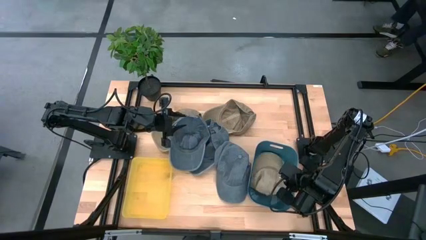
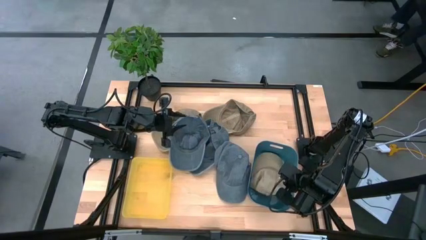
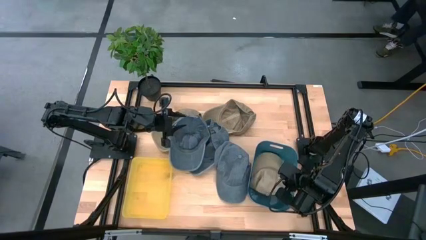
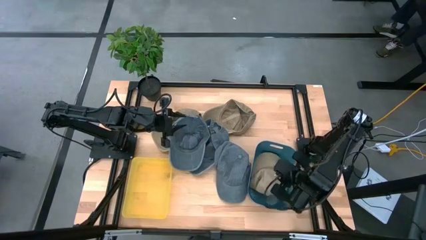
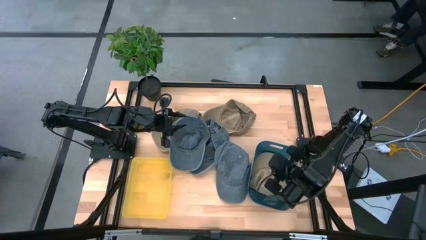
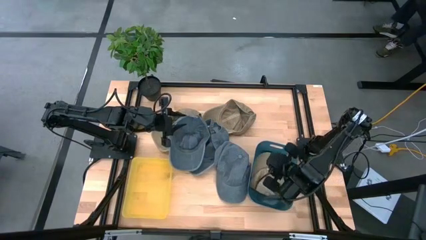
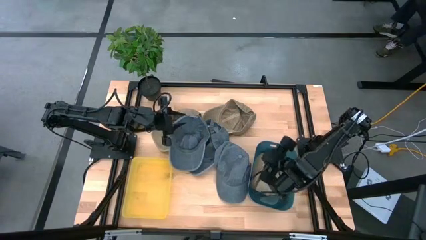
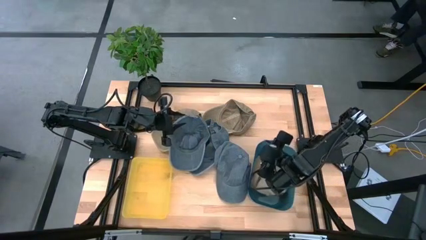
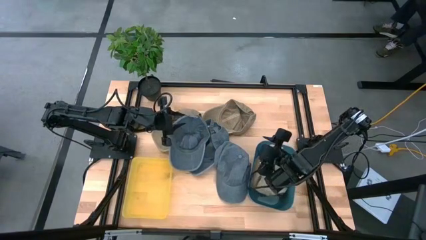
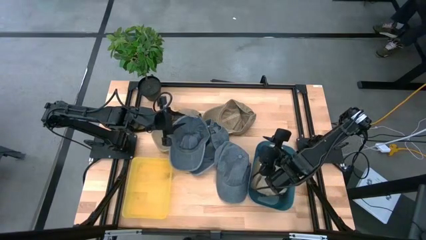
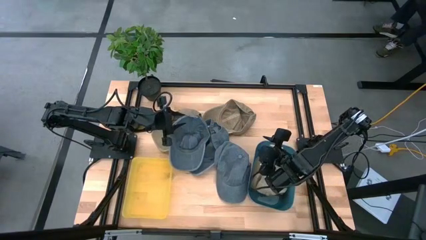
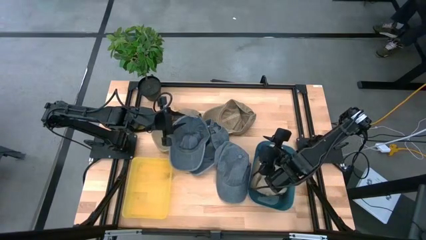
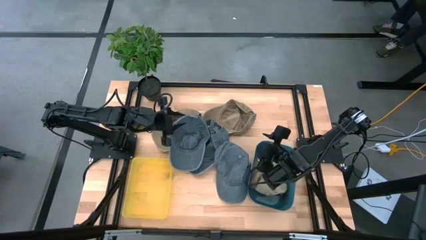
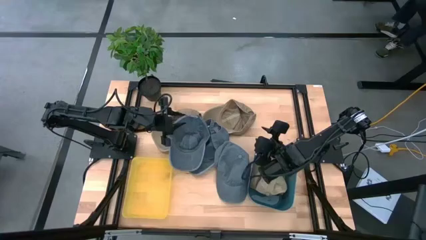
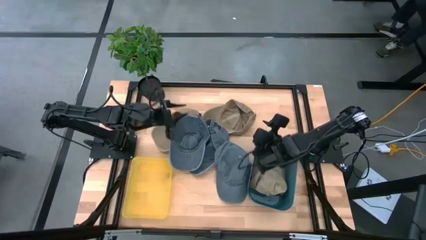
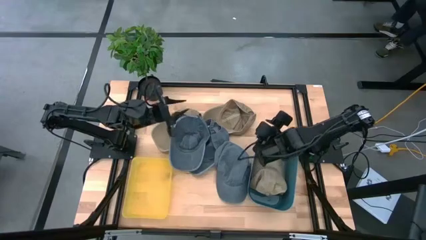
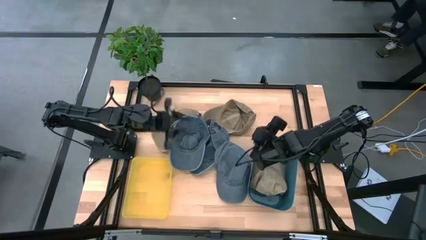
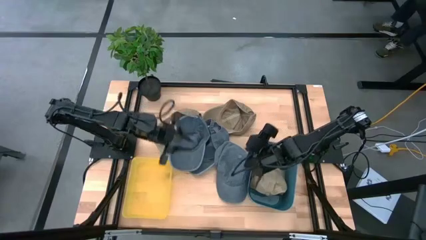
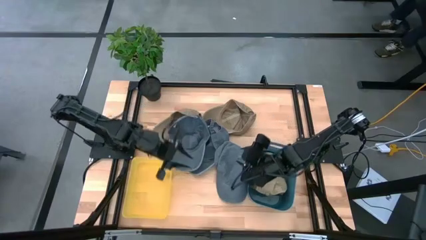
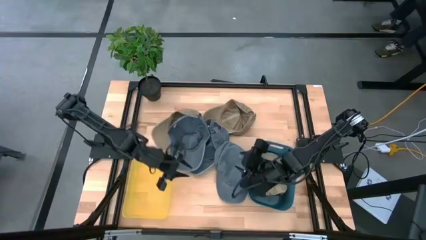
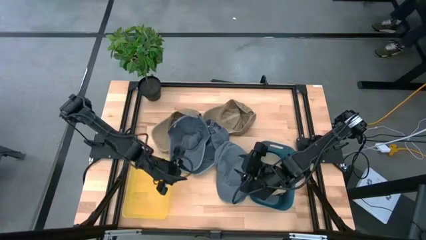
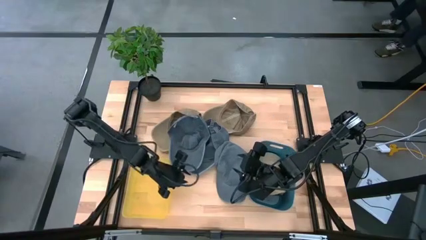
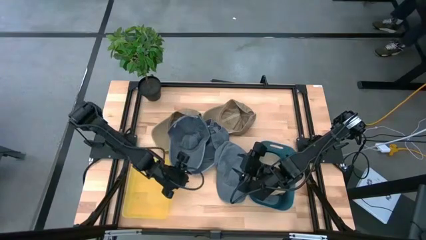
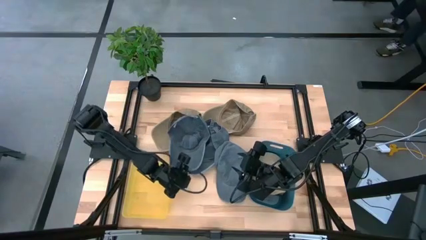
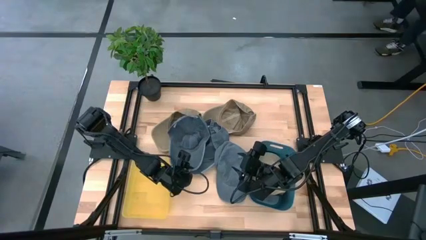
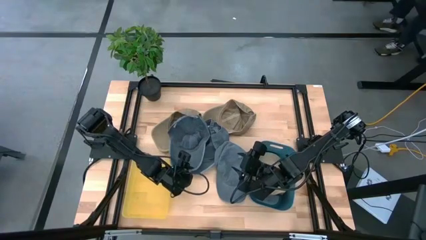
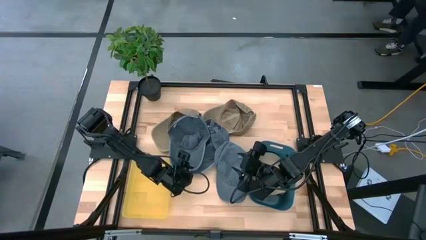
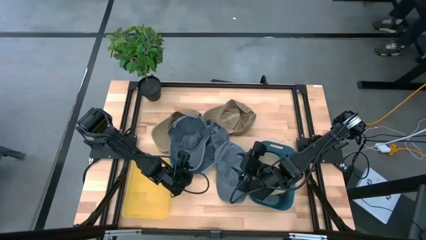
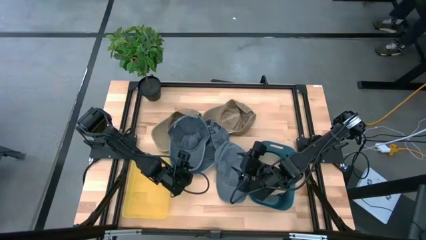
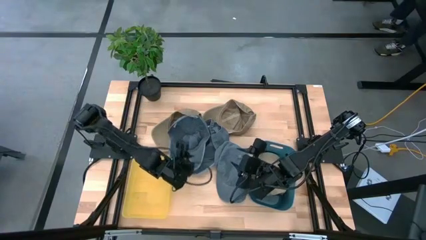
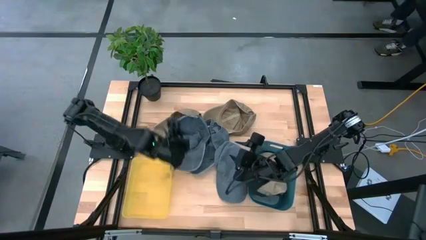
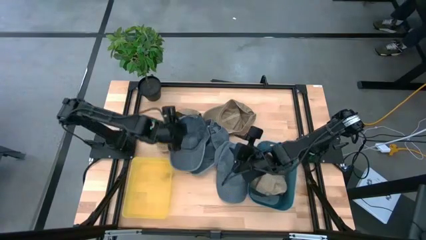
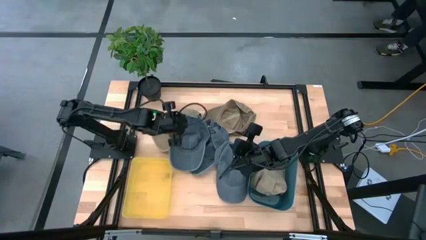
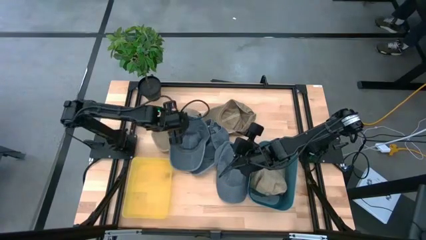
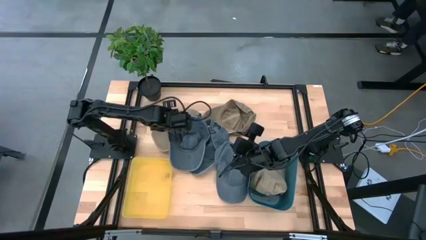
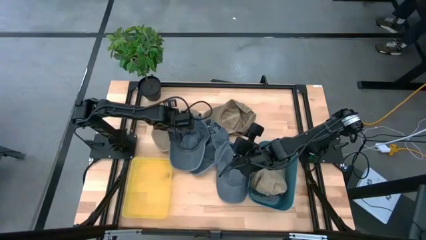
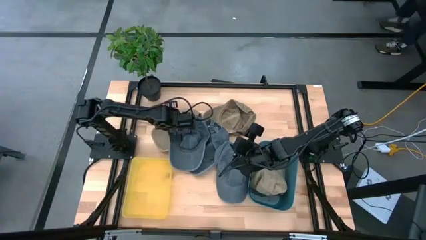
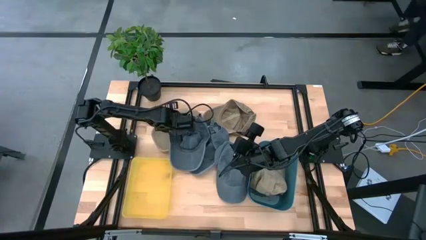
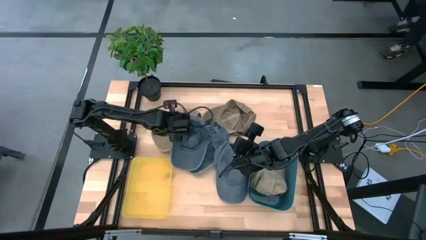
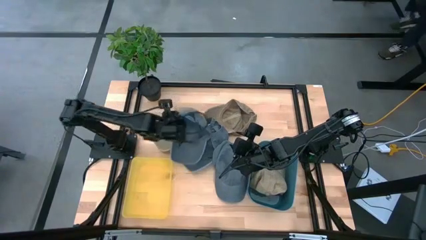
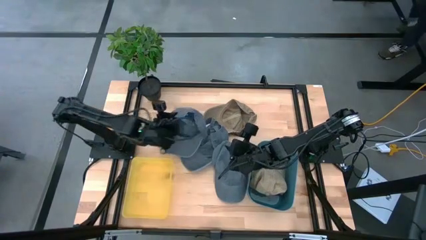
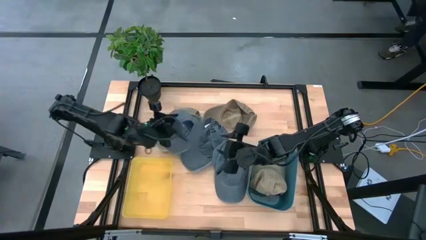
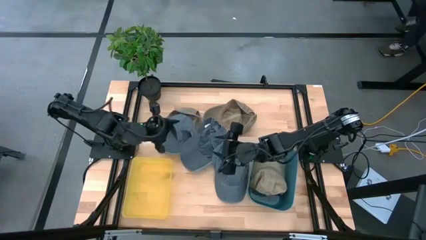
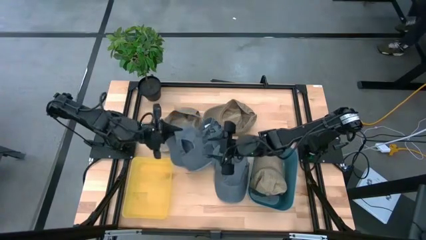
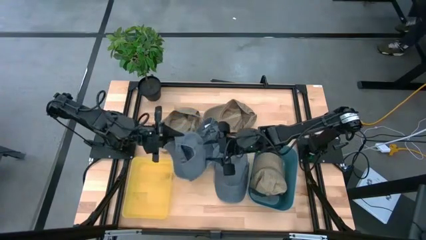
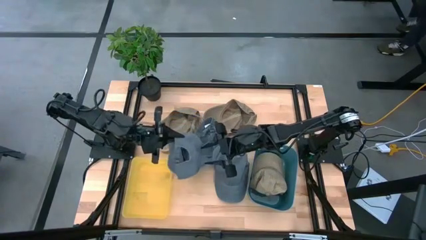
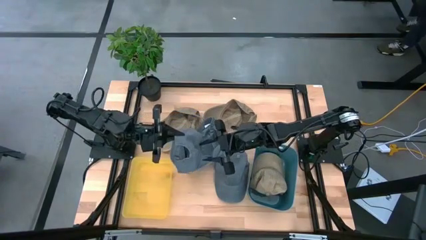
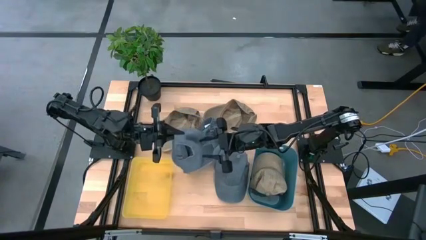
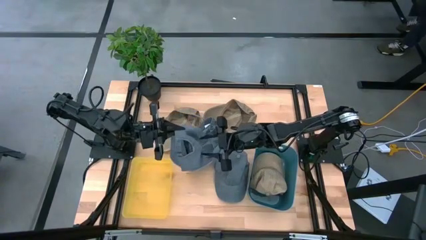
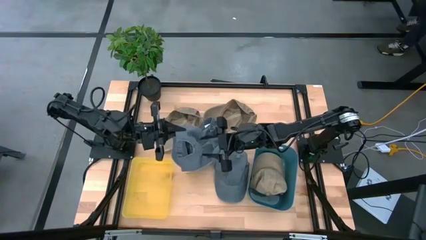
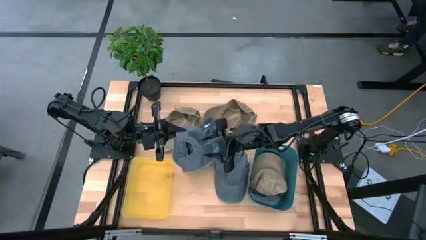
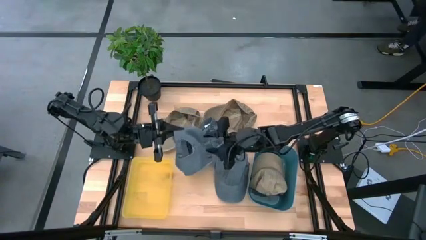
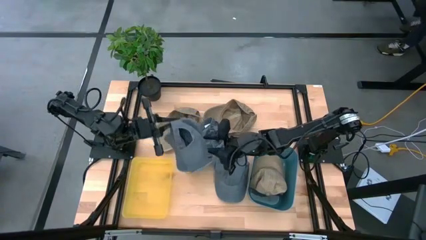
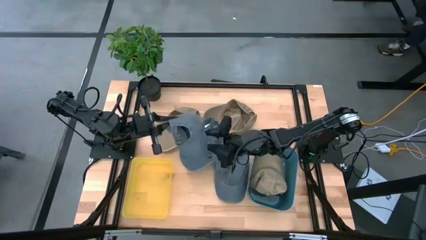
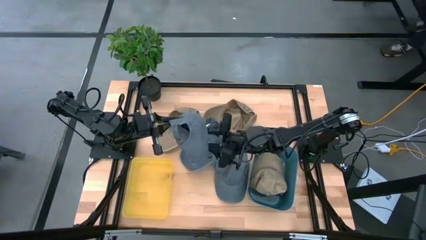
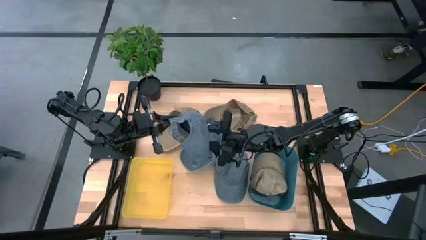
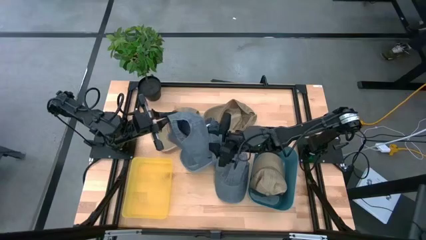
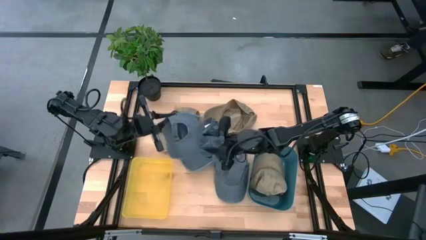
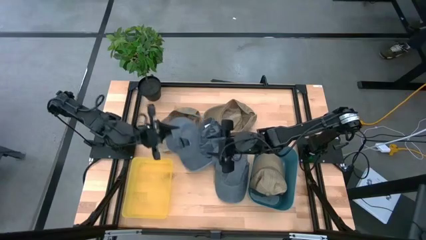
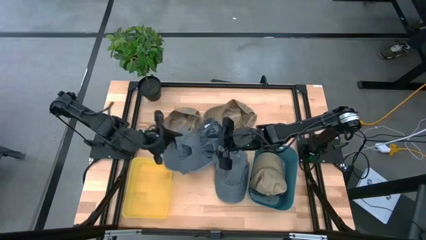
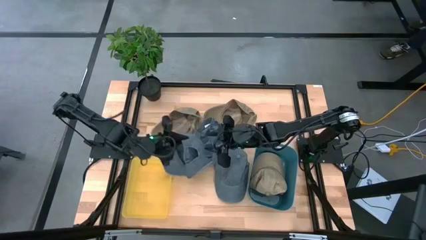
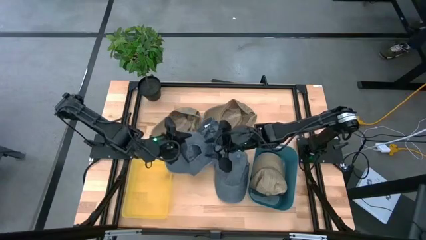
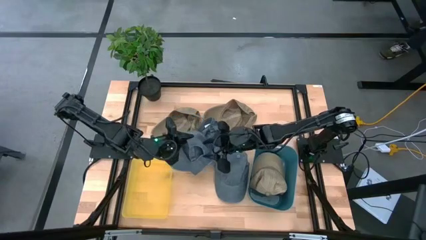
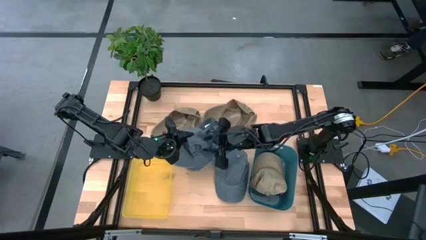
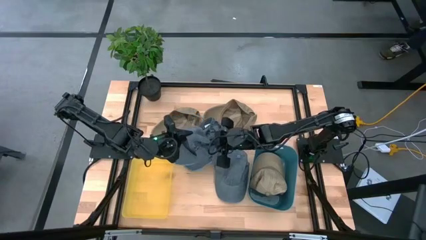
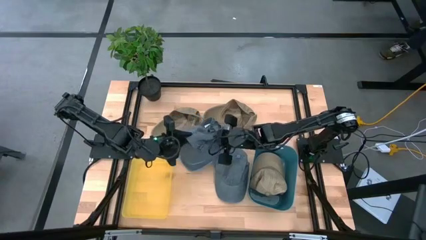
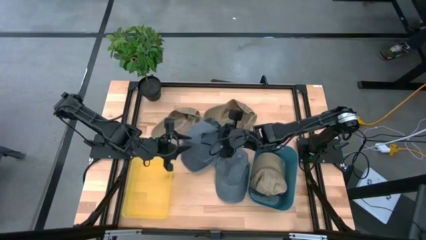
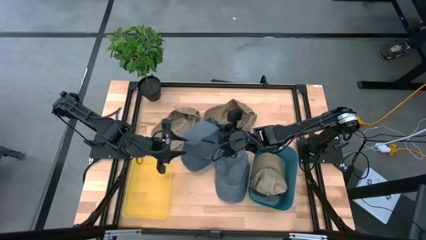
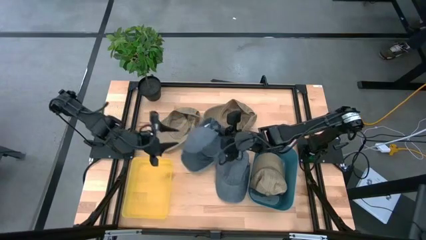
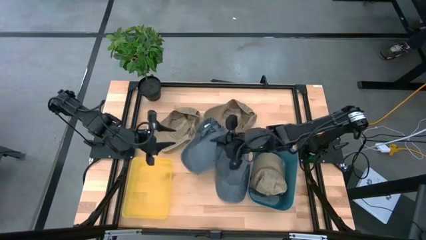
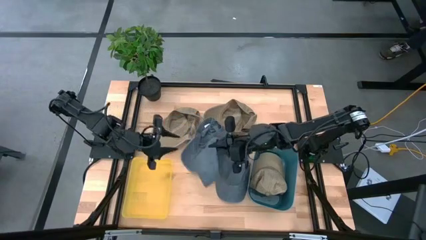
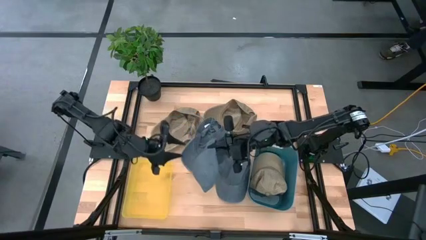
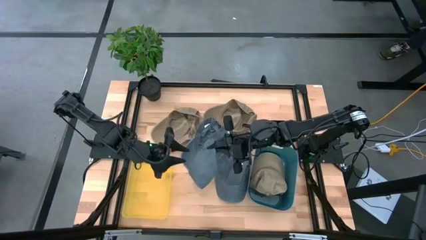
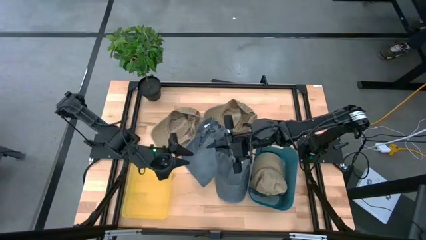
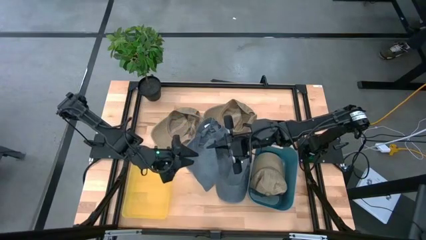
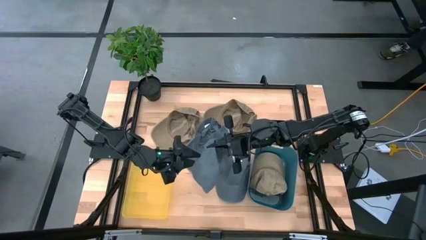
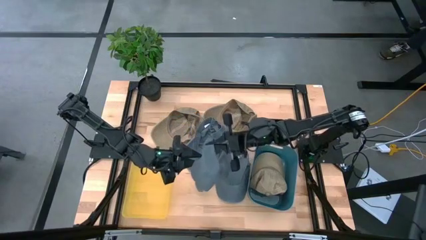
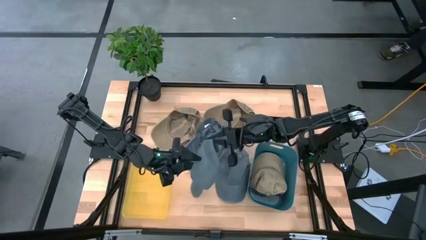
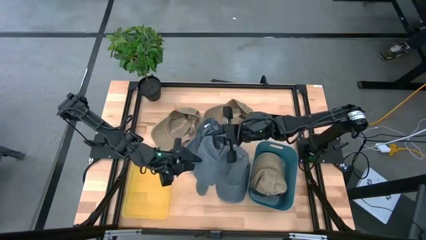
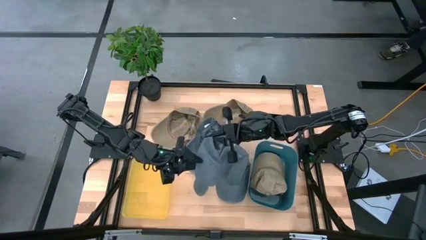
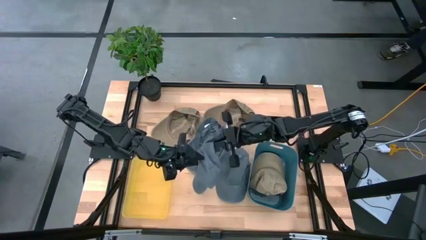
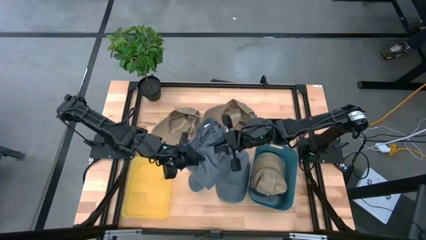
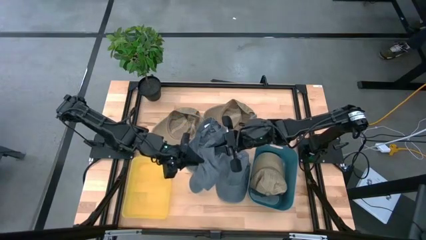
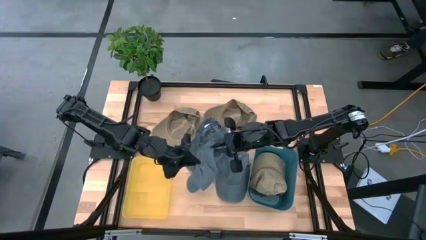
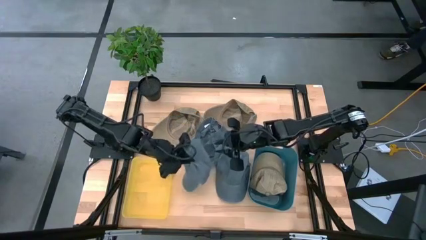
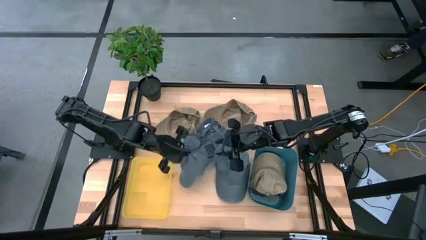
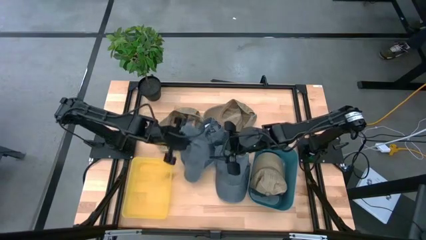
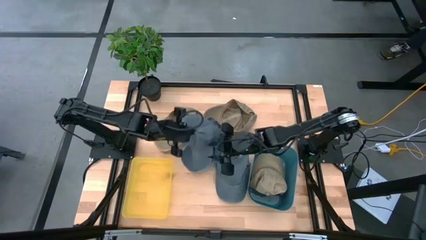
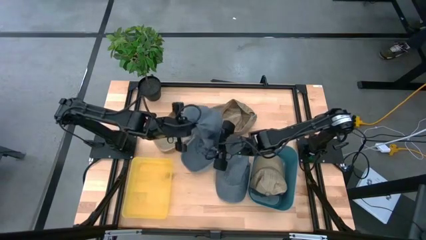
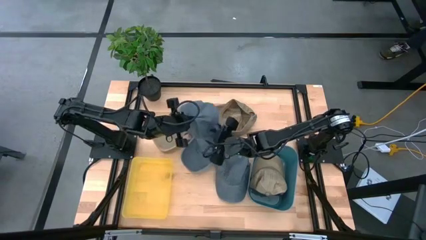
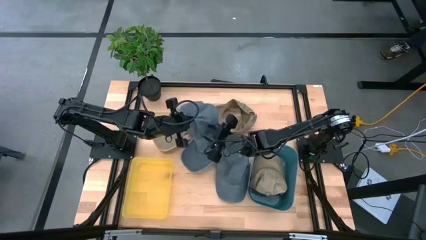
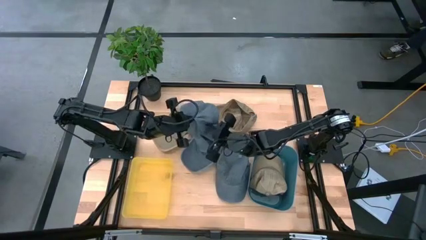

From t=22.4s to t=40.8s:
Task: Pick & Place hat
Put the top left blue cap into the yellow bin
